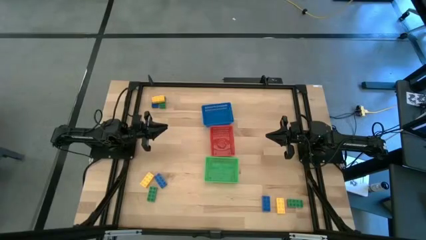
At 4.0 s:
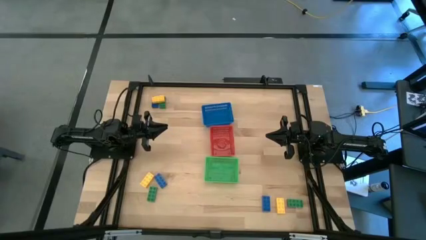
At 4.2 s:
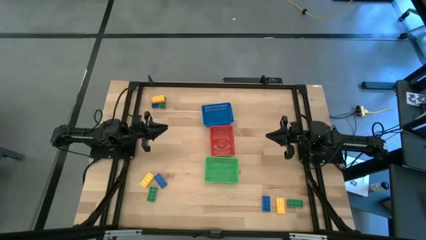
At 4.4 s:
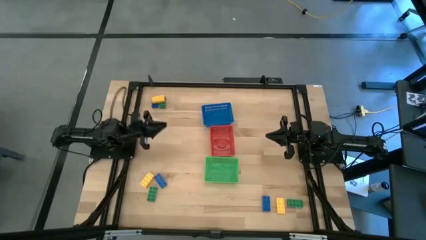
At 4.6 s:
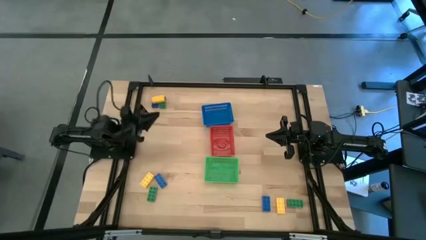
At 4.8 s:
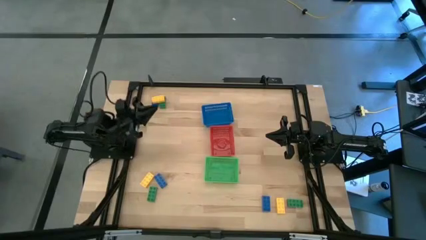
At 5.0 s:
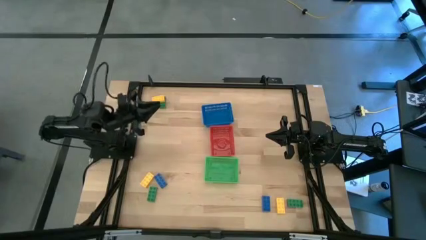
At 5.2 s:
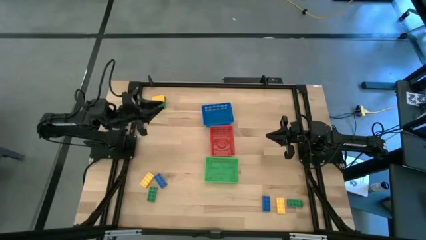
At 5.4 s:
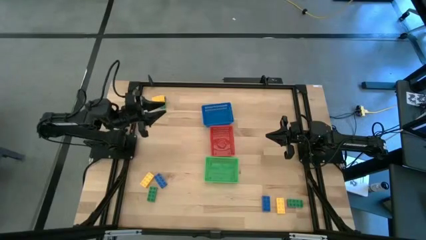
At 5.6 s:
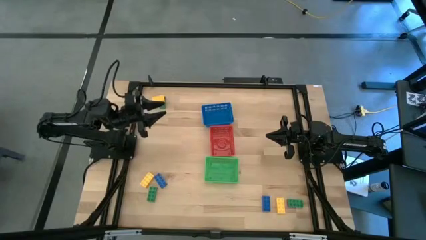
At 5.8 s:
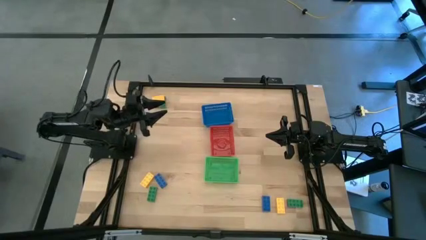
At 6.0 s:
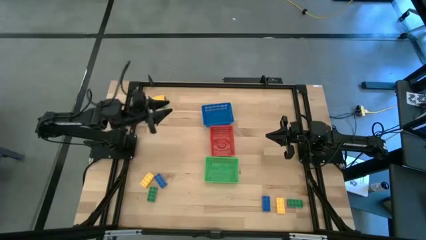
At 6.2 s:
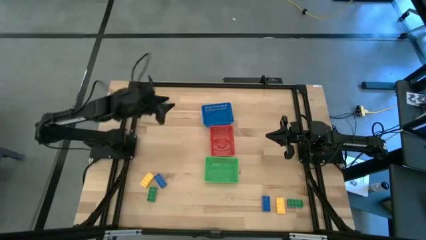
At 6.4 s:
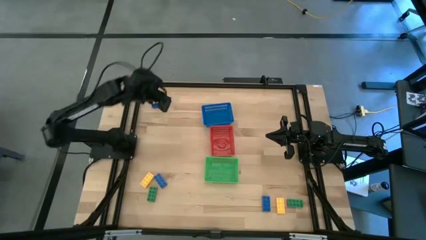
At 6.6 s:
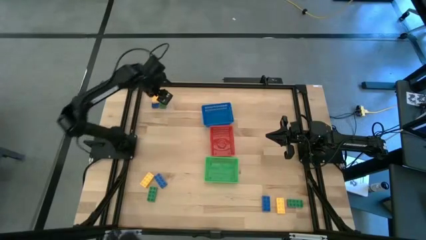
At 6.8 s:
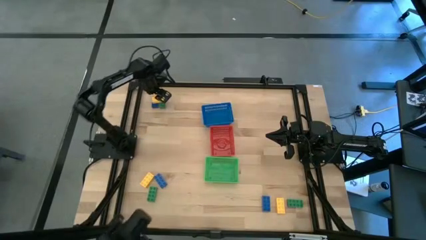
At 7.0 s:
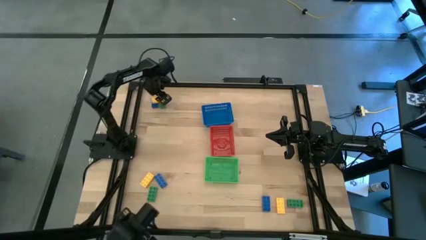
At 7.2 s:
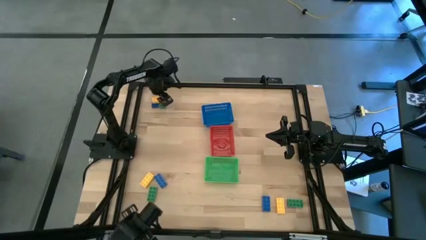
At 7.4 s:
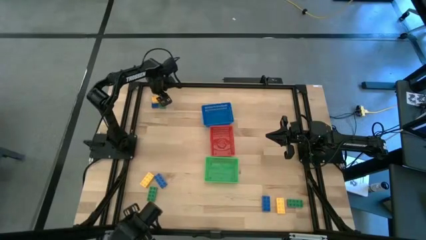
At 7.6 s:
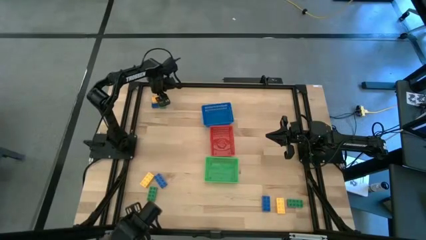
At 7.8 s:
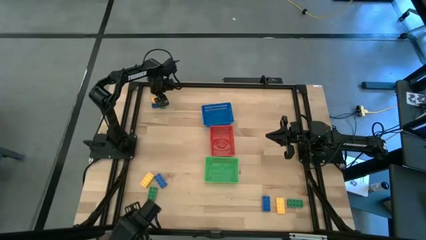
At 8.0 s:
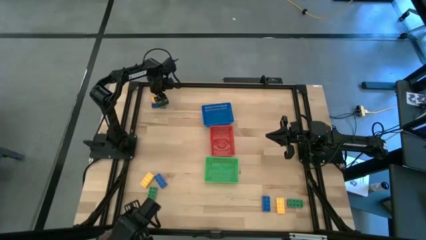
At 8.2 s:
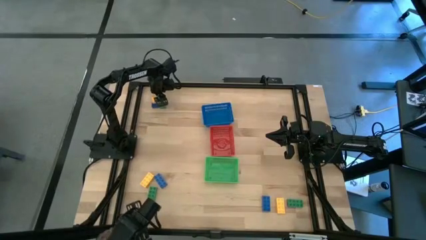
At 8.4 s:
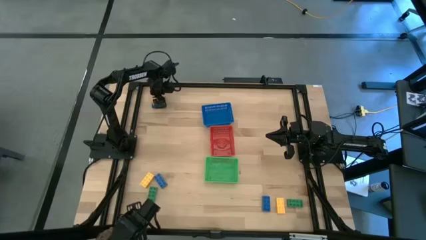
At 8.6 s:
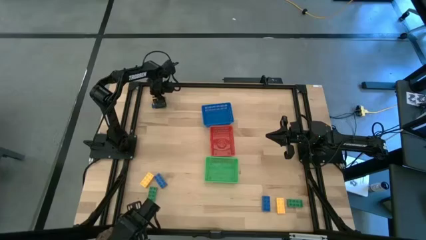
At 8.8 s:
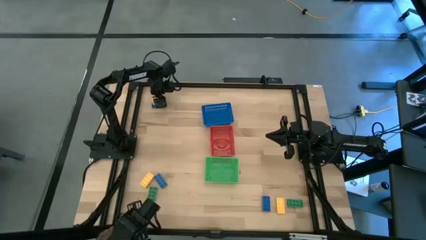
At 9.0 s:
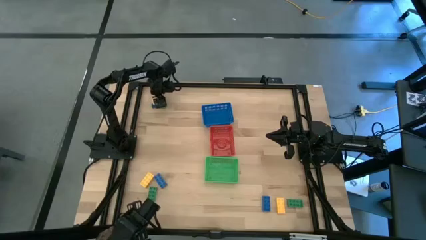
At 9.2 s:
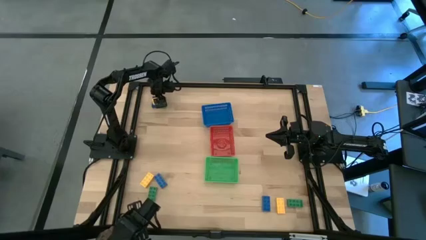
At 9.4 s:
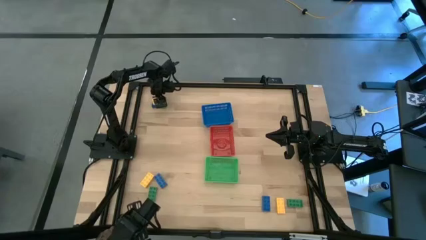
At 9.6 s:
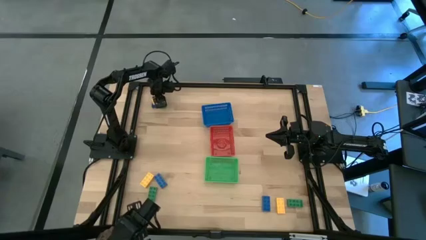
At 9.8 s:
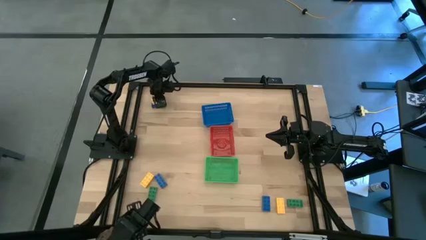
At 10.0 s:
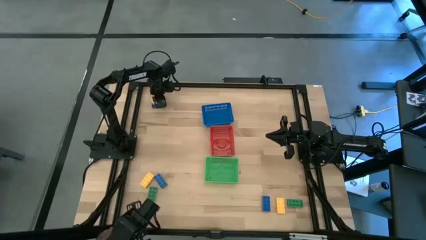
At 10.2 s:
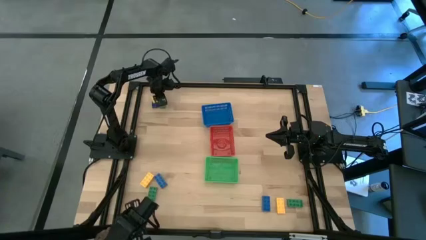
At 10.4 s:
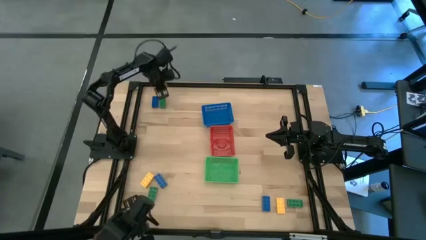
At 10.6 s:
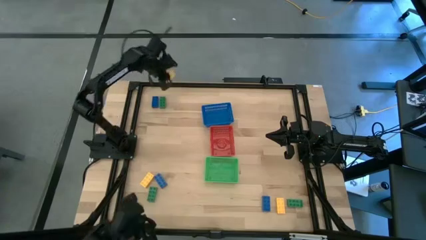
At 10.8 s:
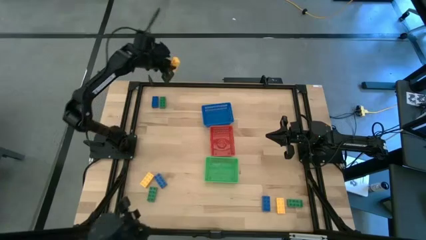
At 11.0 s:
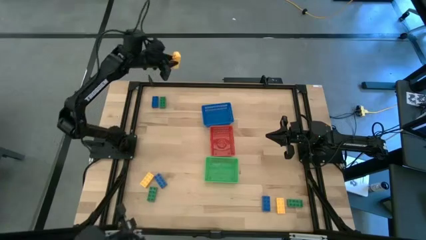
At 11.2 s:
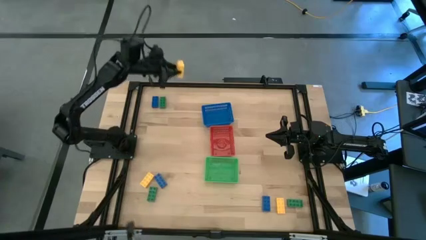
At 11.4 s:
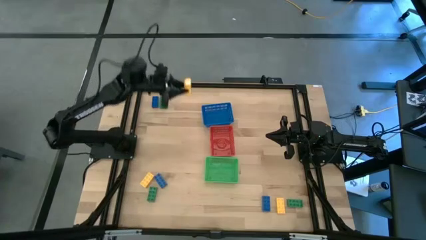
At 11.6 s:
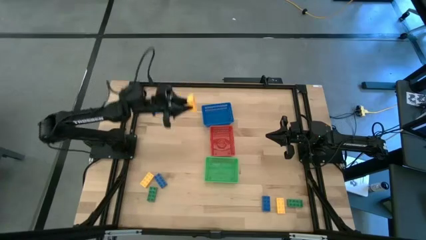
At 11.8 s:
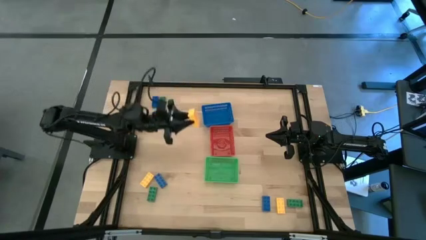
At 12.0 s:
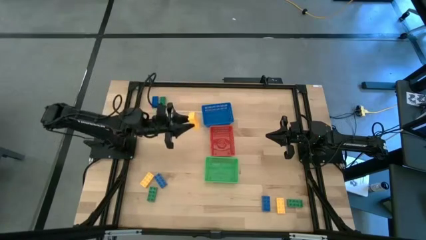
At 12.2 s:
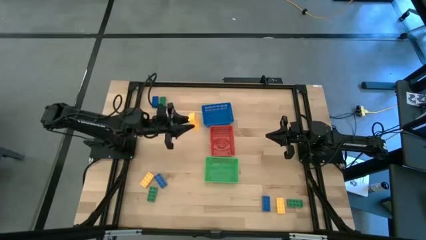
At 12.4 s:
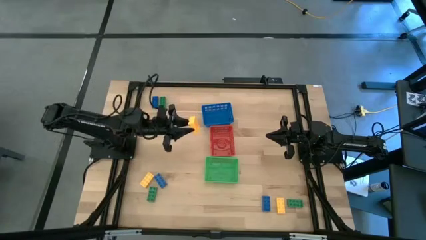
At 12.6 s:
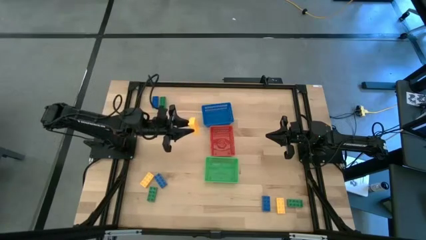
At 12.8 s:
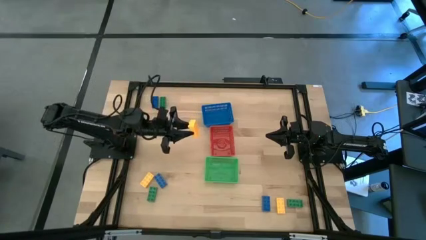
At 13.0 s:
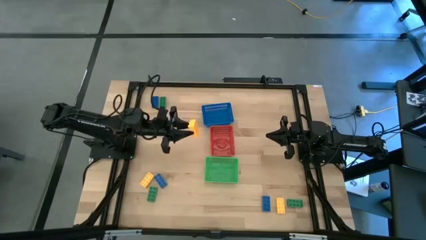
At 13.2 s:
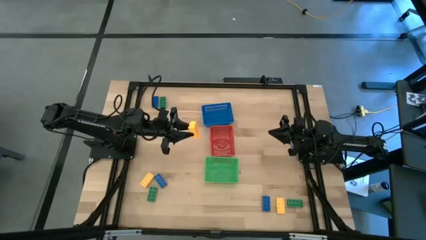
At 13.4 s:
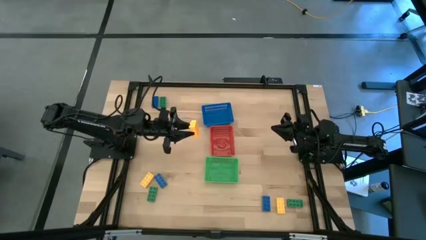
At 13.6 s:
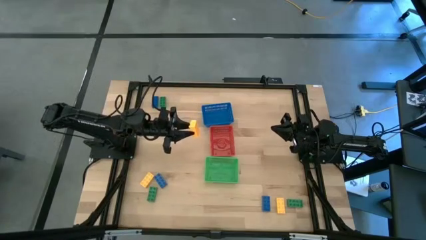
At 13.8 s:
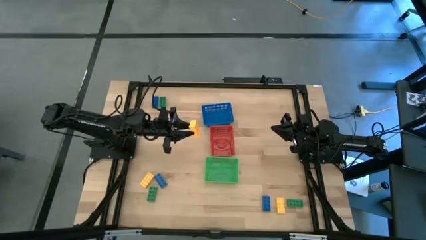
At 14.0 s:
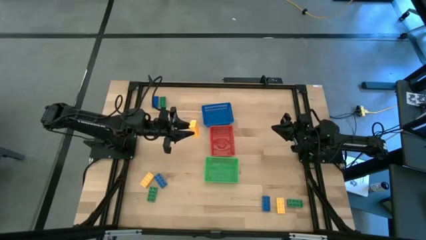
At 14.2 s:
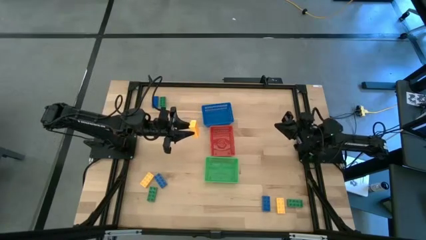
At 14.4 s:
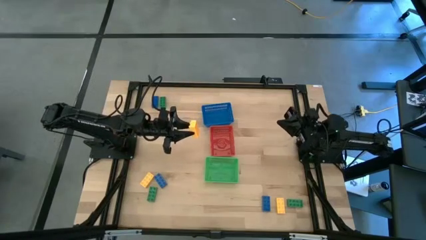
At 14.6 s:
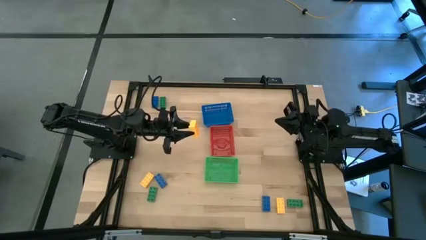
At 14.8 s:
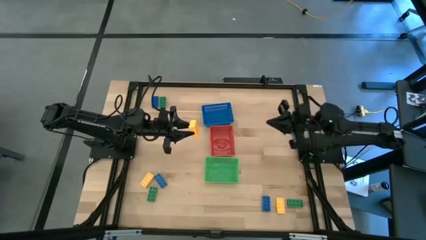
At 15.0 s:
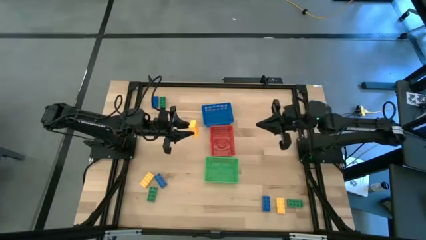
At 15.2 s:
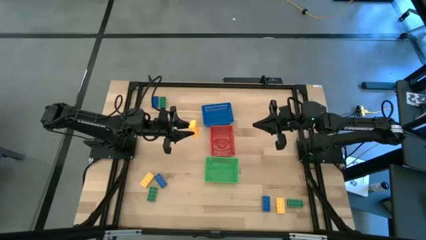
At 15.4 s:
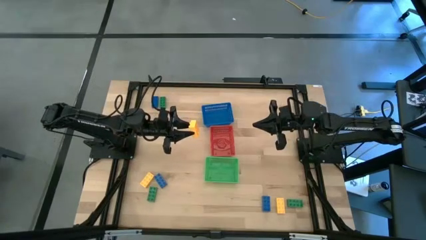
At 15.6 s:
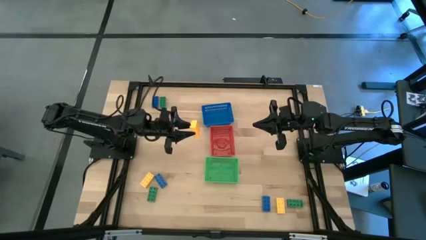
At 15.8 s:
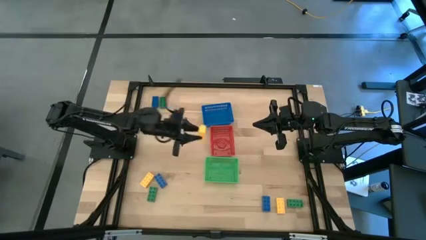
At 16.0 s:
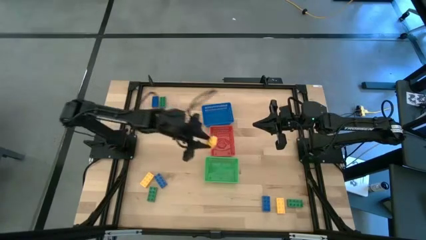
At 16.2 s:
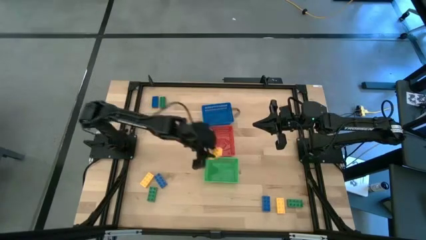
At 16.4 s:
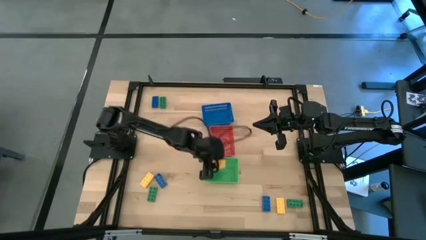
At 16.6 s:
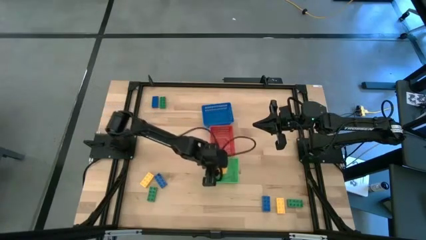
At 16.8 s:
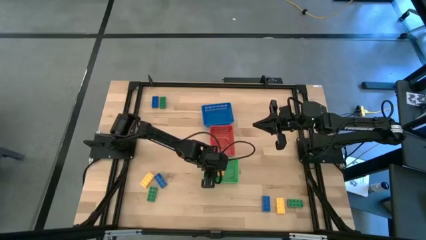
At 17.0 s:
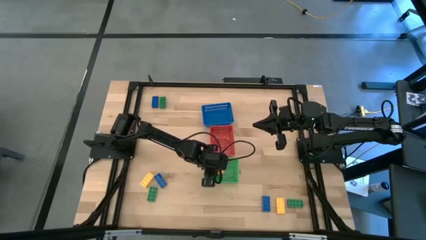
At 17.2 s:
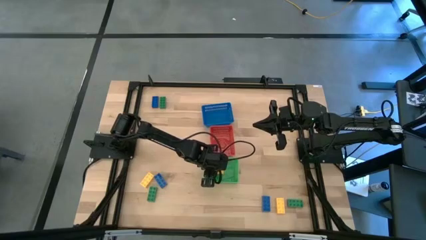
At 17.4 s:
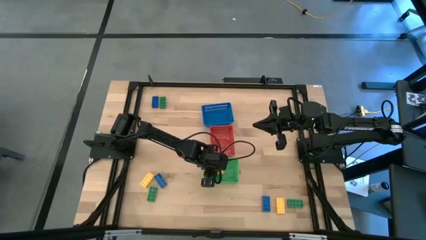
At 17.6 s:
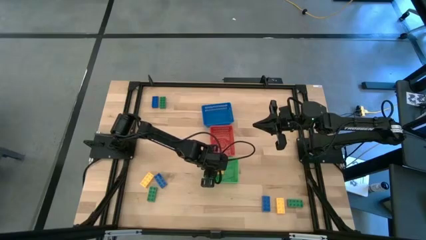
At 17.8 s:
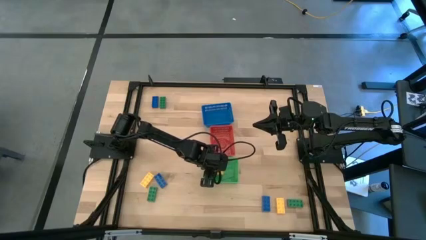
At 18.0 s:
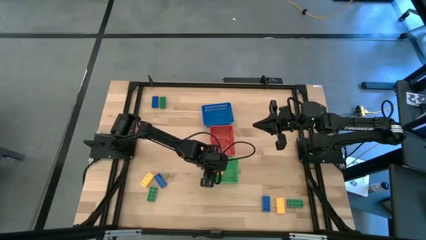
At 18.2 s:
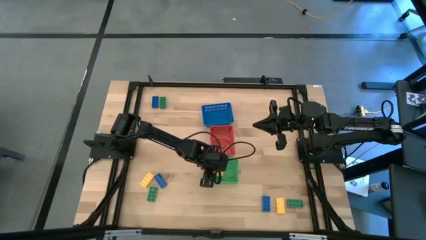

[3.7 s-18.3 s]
Task: Sort & place blocks by color
Put the top yellow game piece into the green basket
